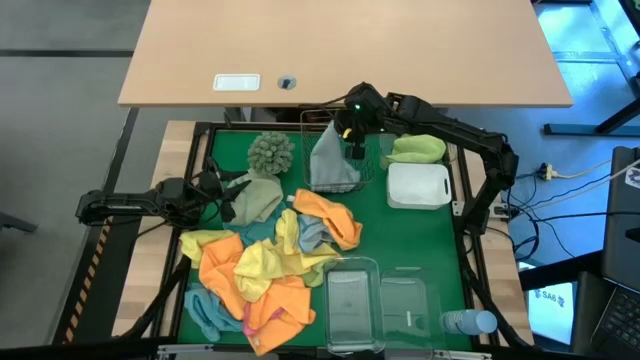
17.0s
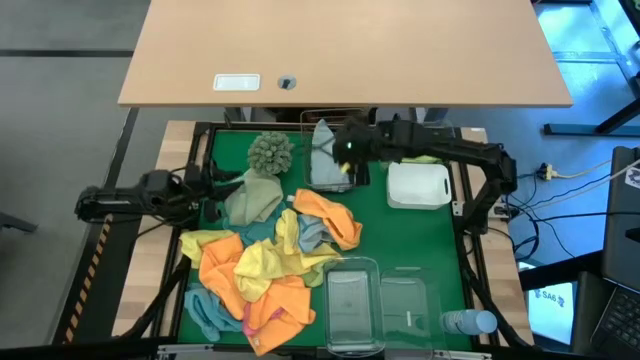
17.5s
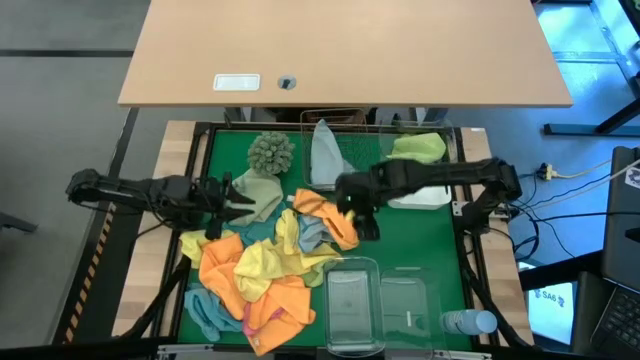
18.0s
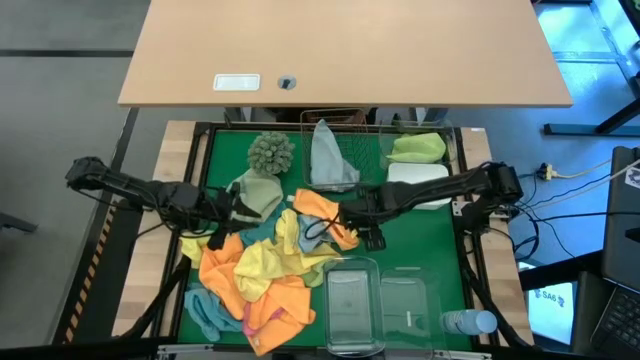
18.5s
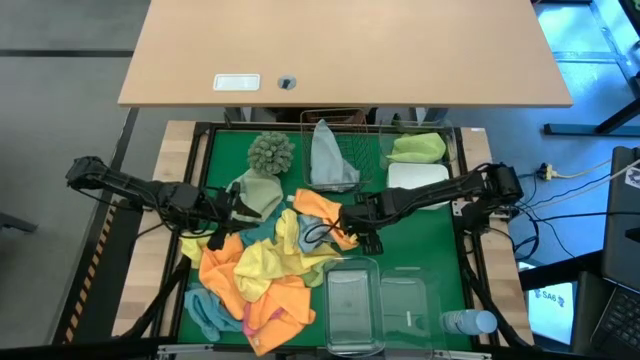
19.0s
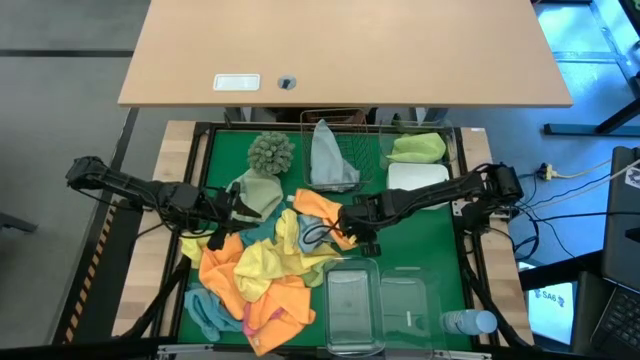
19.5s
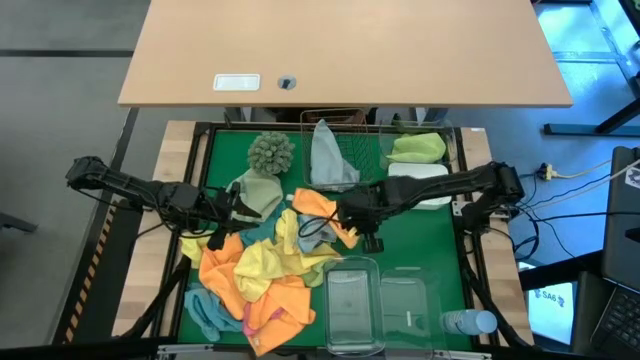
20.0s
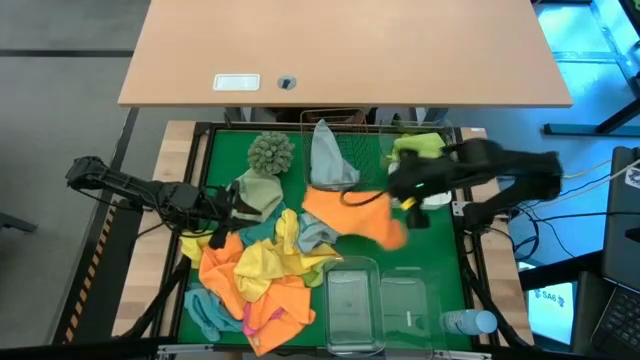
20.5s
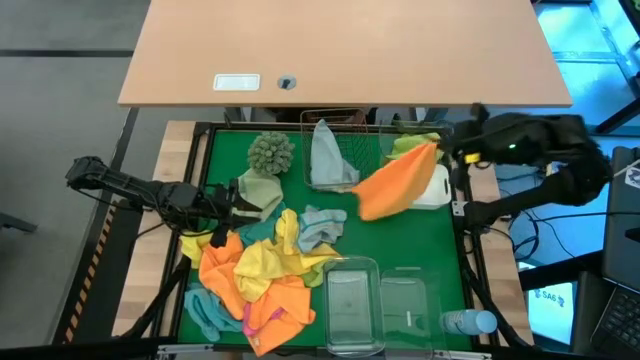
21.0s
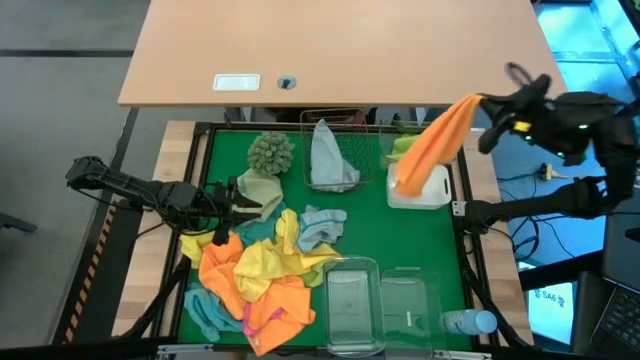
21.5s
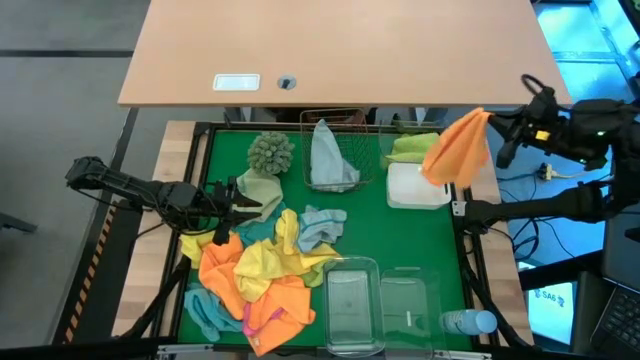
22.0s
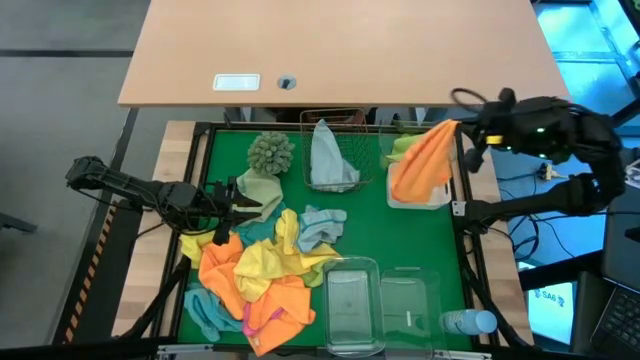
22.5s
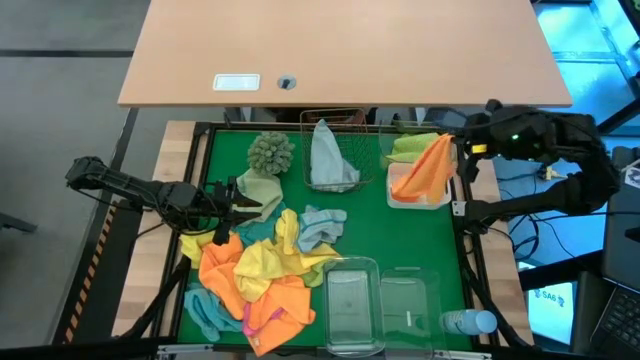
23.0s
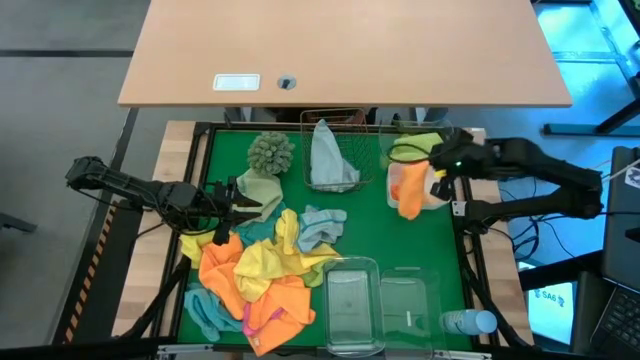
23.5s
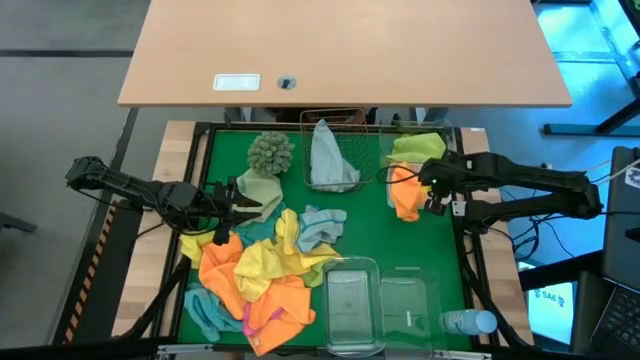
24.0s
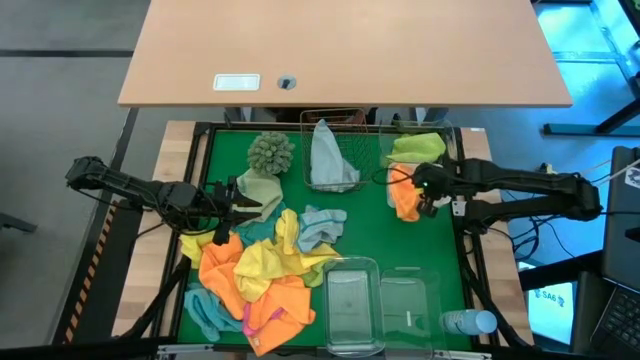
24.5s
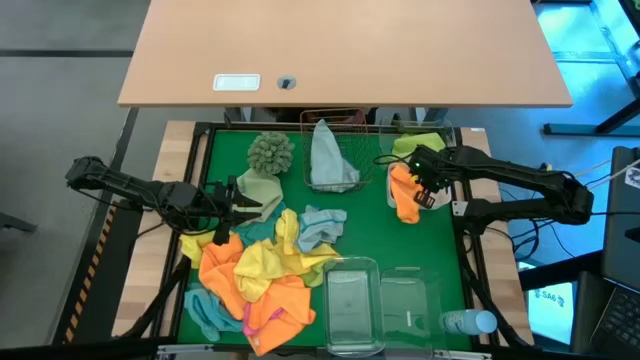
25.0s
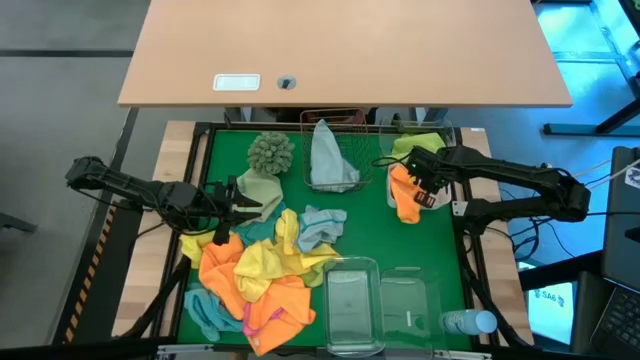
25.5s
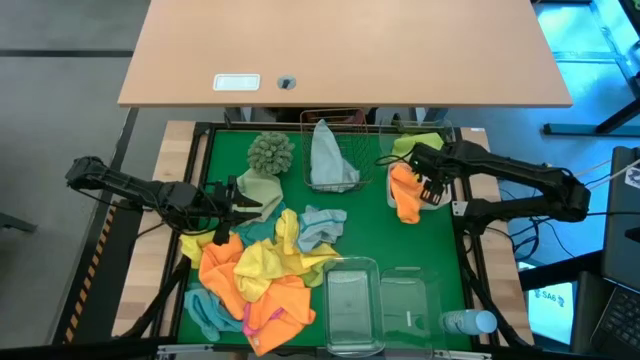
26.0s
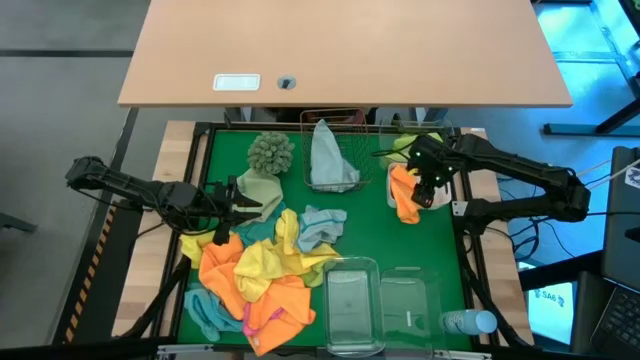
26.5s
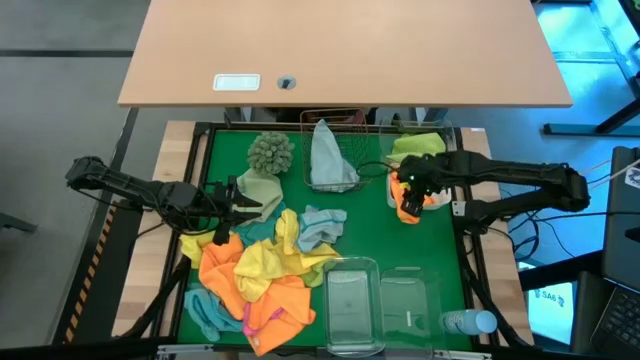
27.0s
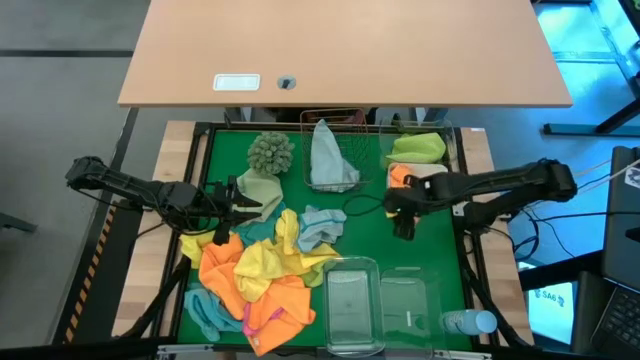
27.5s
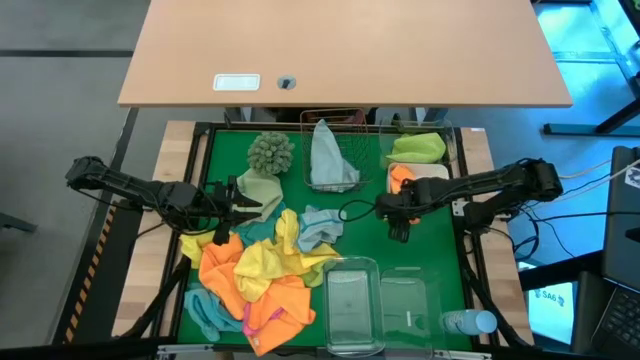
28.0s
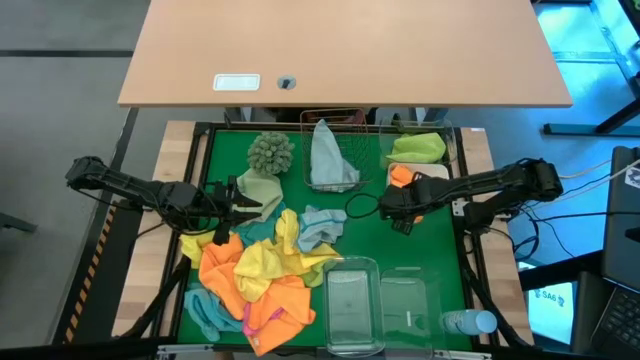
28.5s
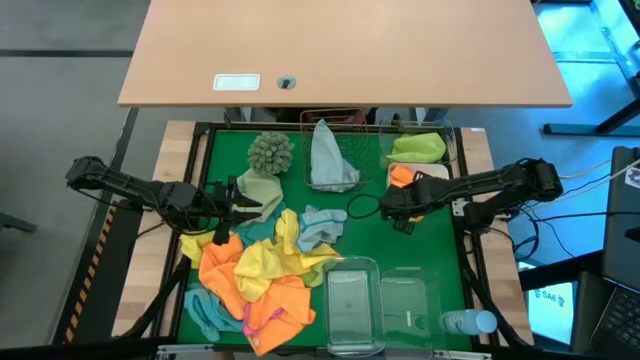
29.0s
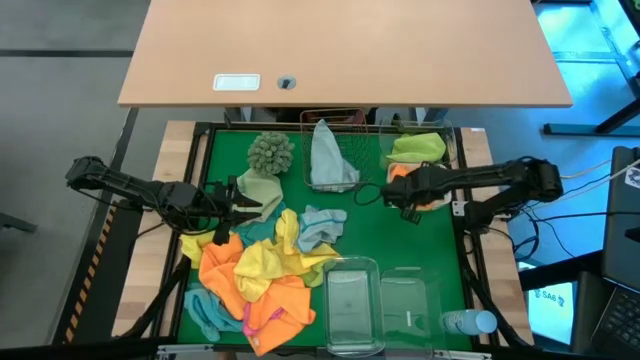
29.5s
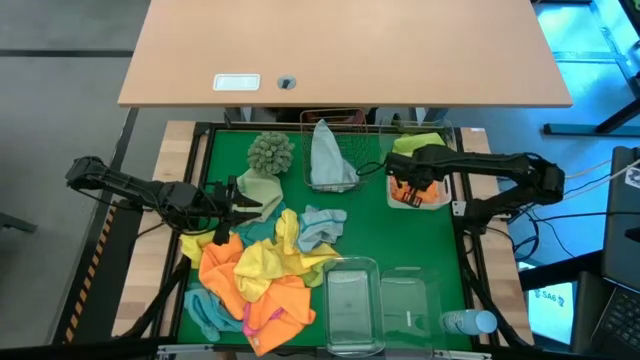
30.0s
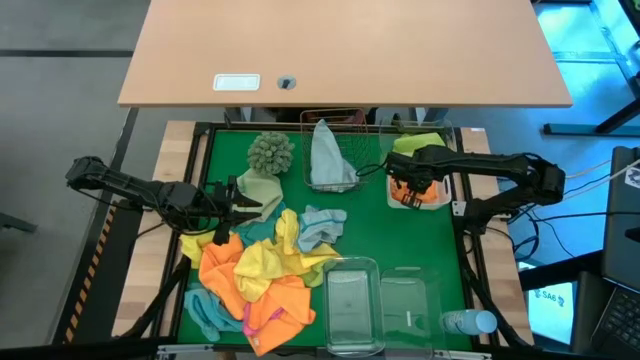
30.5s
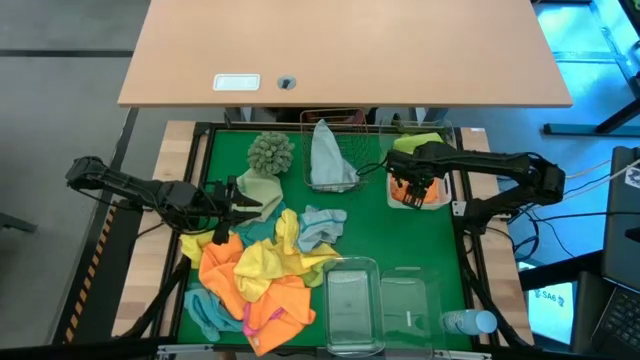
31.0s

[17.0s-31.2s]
Task: Sort microfiber towel by color & place in baskets
Put the orange microfiber towel into the white bin

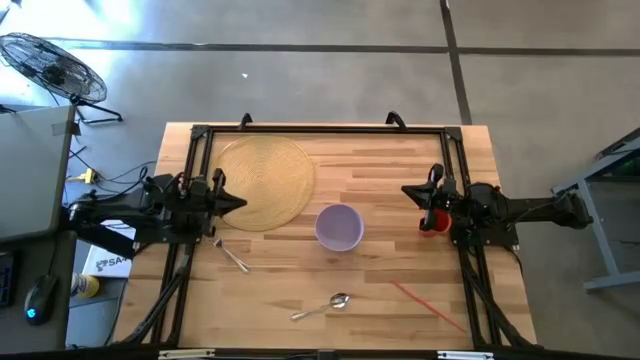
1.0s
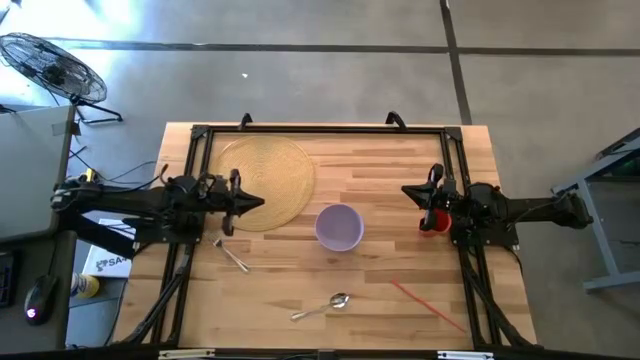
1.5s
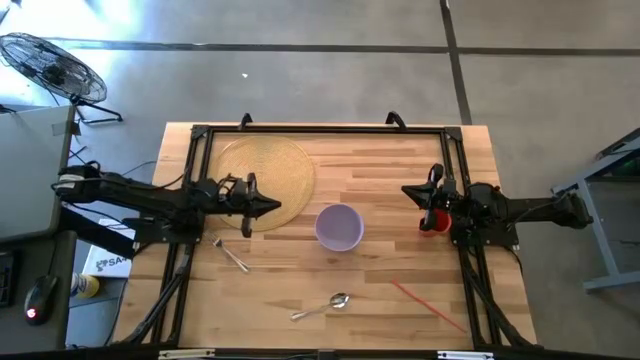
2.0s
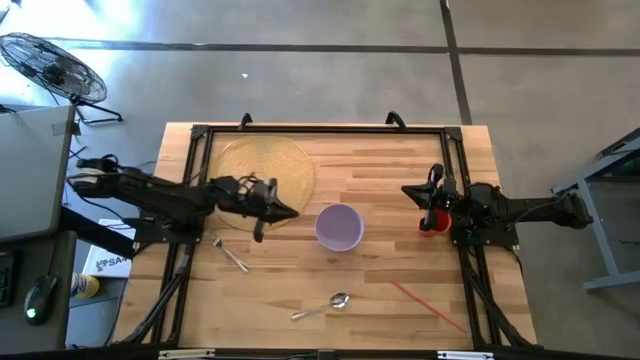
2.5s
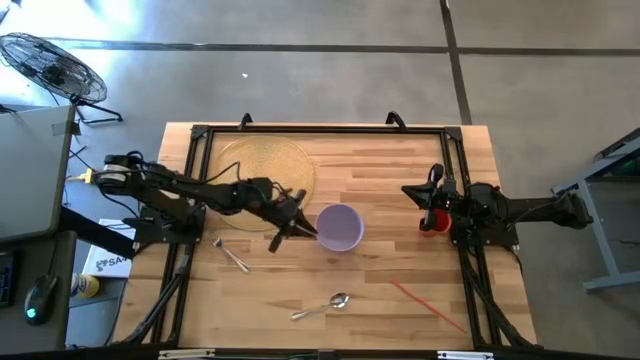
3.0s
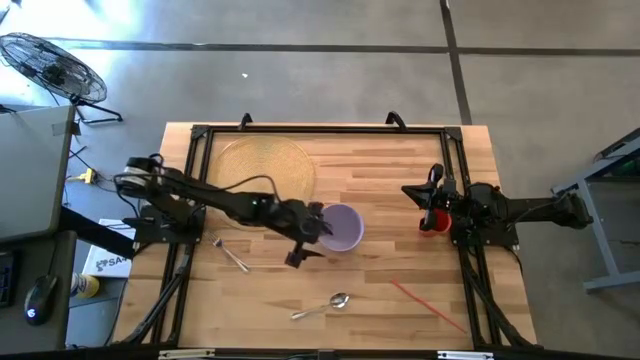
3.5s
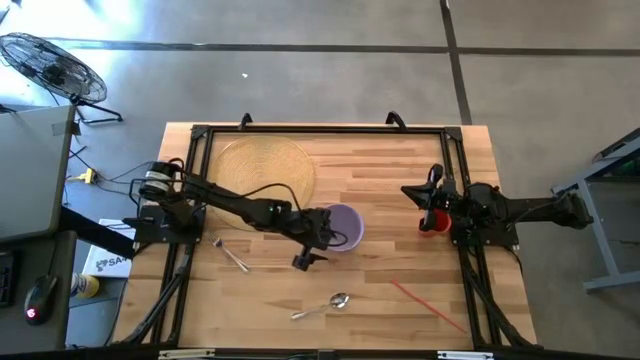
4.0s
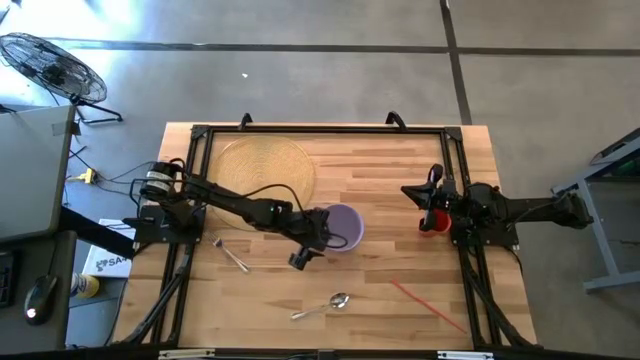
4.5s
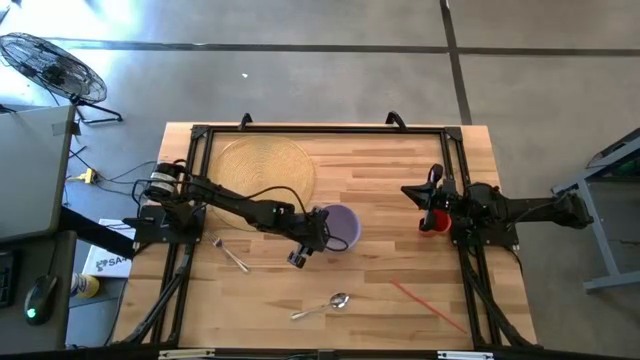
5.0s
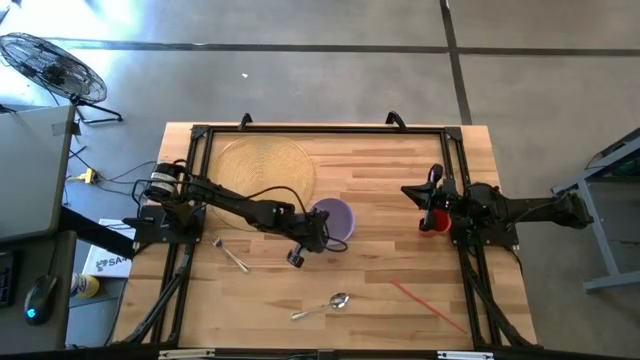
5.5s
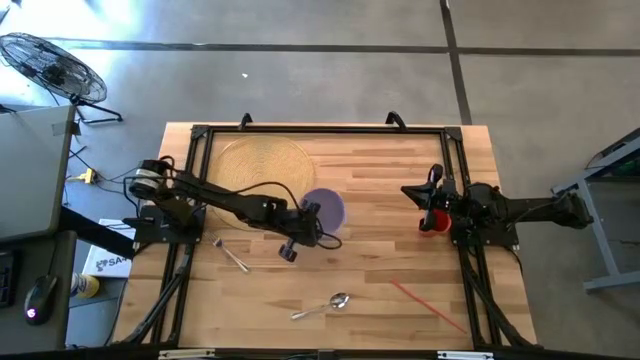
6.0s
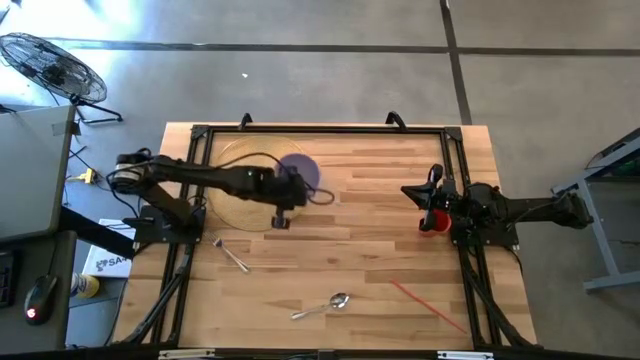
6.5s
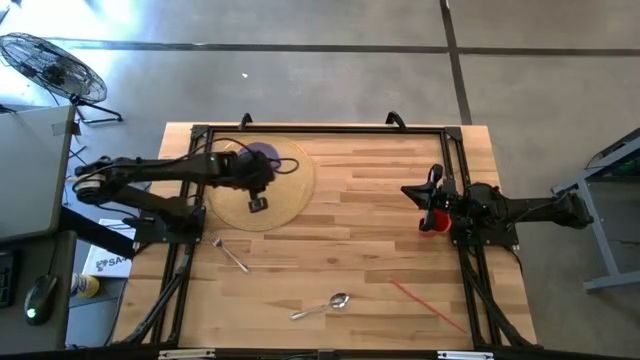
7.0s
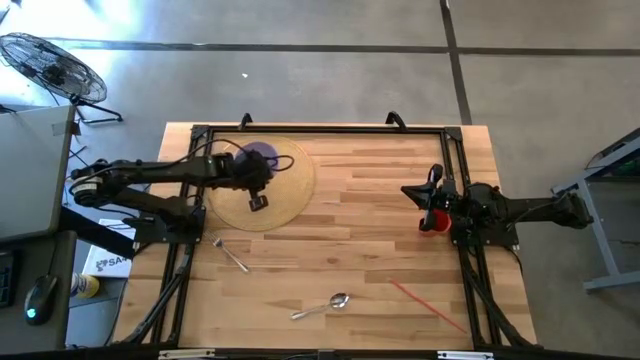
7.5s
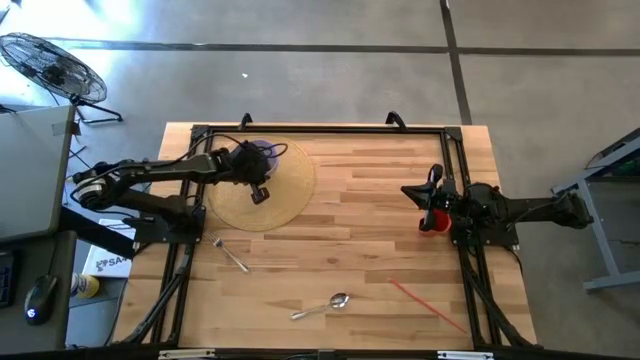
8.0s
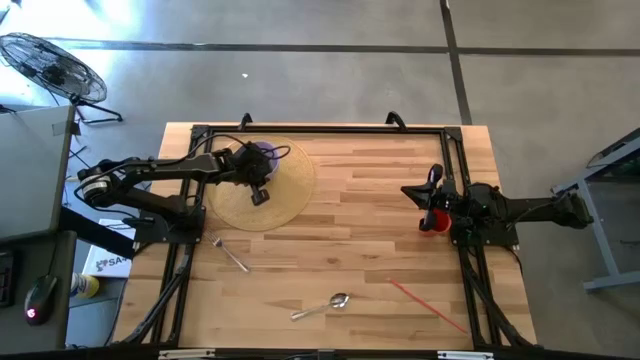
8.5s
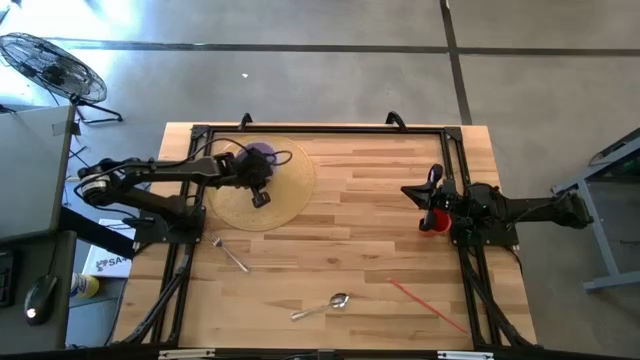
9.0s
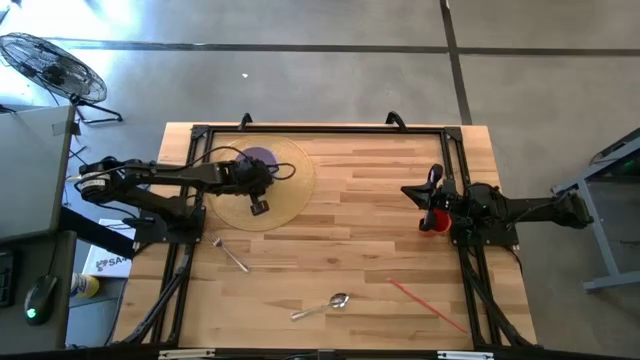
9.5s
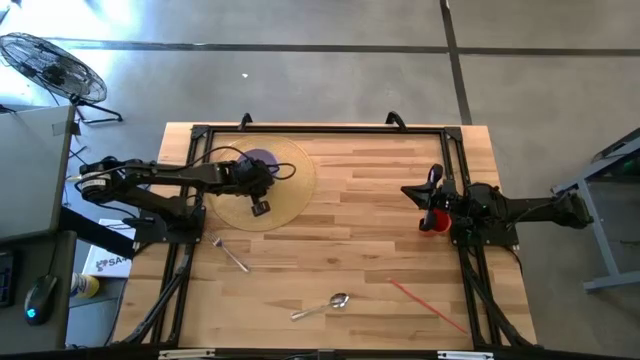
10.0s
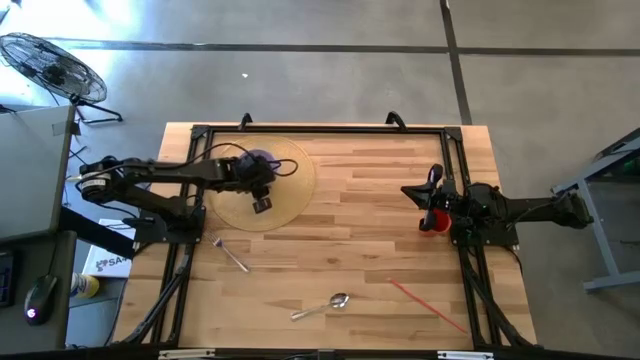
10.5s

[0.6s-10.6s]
Task: Pick & Place Utensil
Put the purple bowl on the brown table mat
